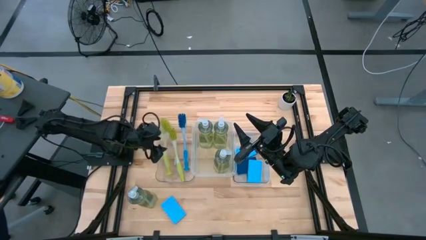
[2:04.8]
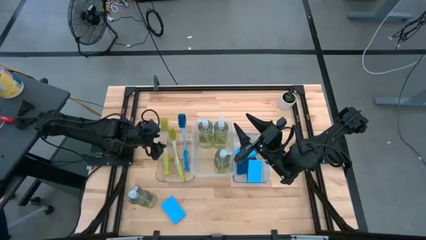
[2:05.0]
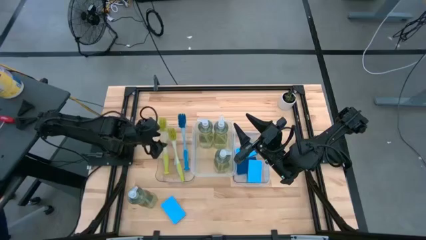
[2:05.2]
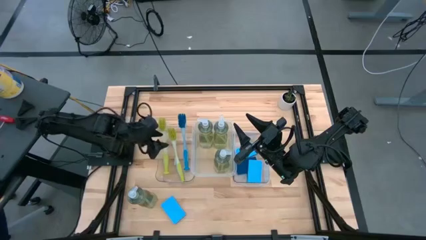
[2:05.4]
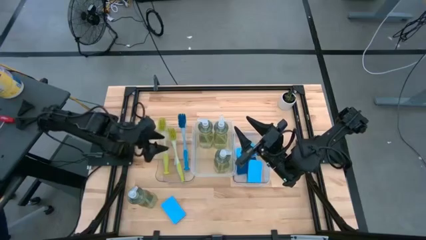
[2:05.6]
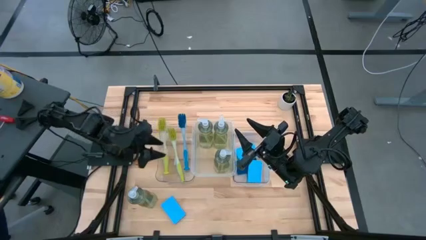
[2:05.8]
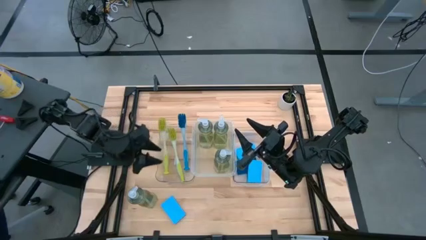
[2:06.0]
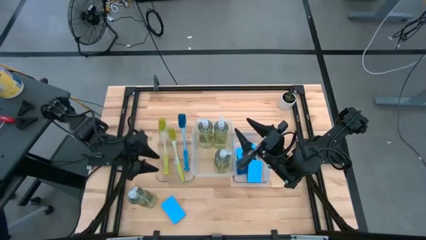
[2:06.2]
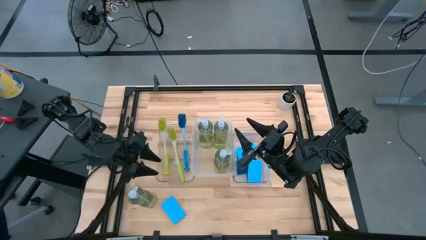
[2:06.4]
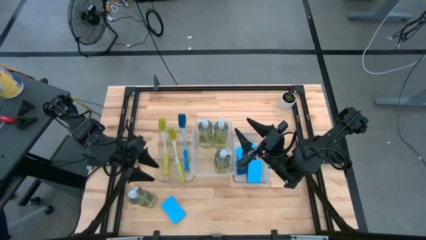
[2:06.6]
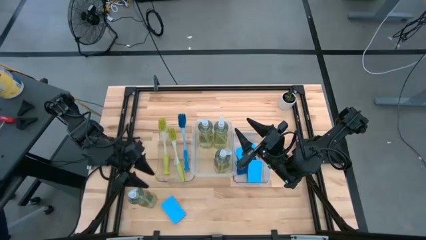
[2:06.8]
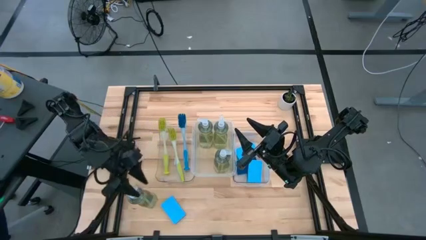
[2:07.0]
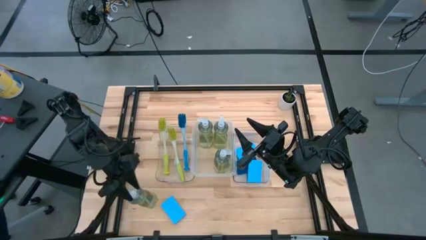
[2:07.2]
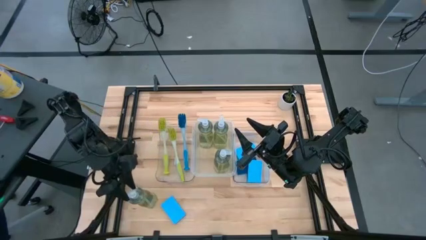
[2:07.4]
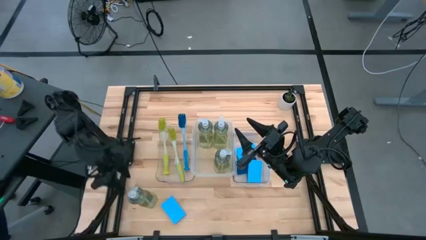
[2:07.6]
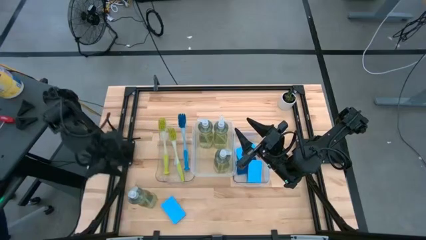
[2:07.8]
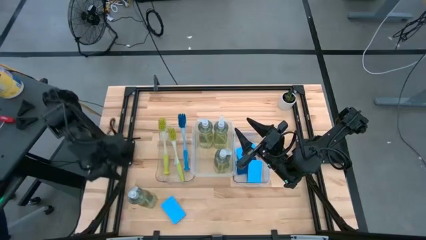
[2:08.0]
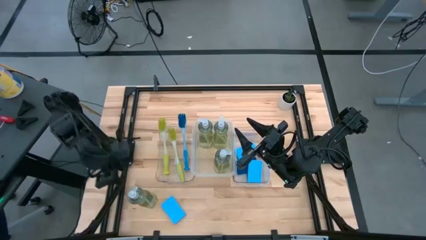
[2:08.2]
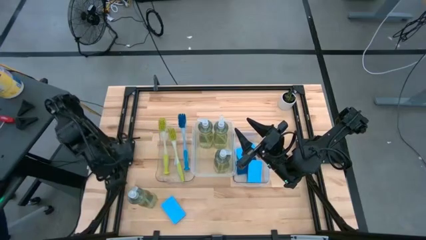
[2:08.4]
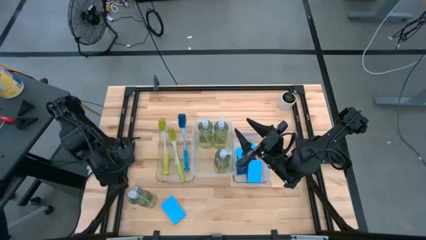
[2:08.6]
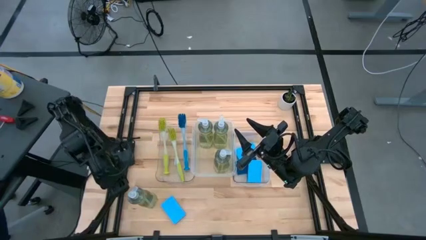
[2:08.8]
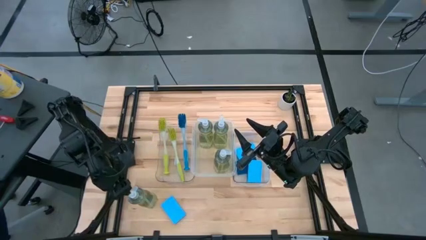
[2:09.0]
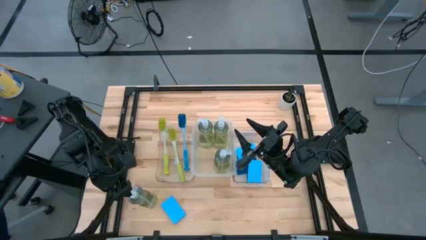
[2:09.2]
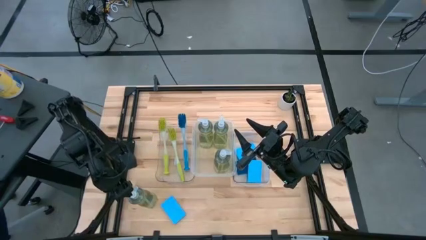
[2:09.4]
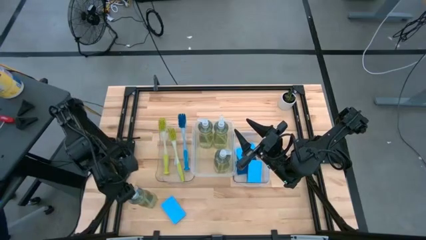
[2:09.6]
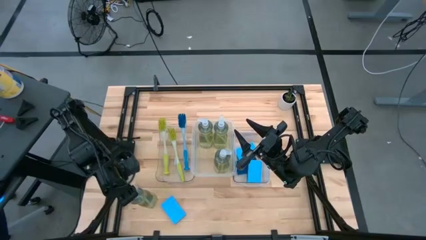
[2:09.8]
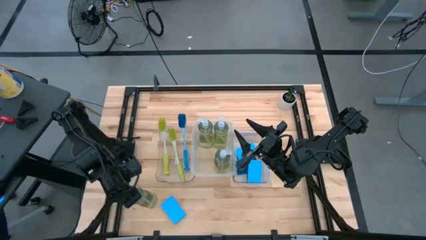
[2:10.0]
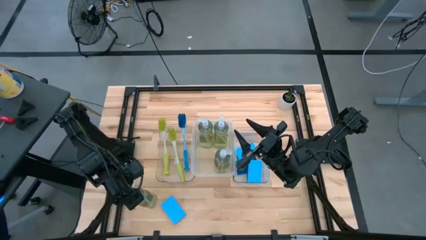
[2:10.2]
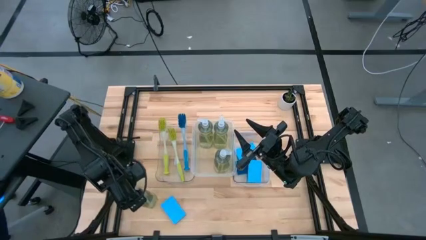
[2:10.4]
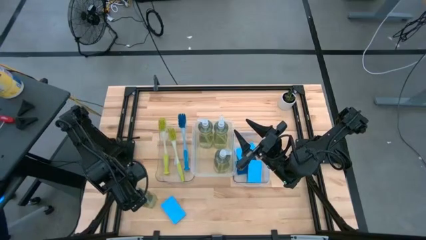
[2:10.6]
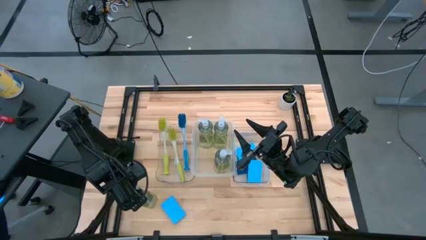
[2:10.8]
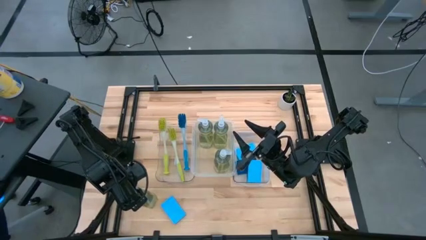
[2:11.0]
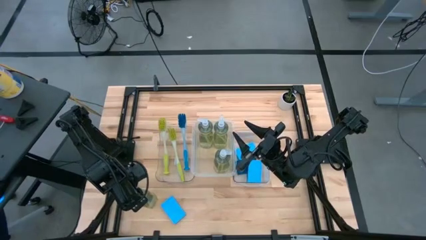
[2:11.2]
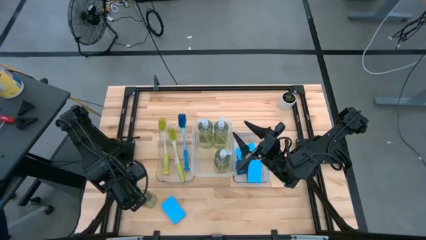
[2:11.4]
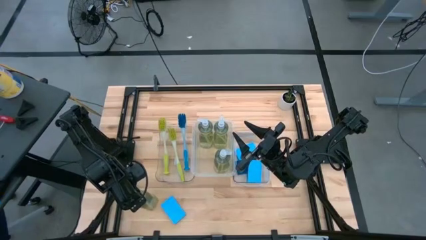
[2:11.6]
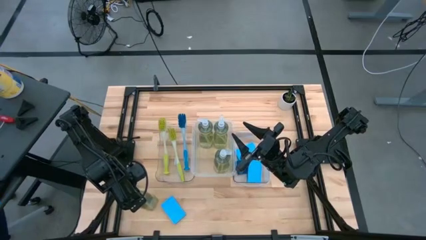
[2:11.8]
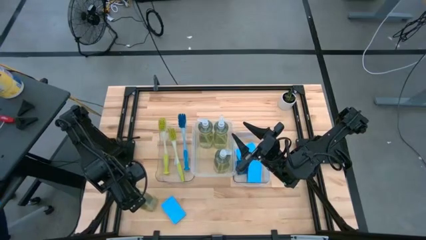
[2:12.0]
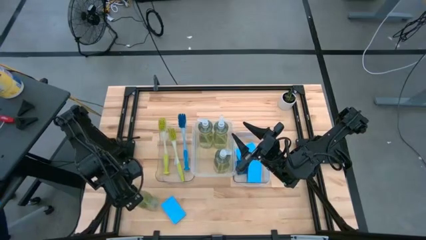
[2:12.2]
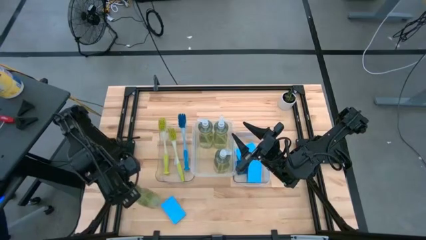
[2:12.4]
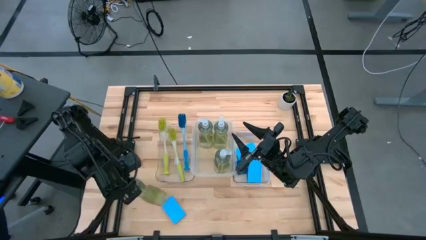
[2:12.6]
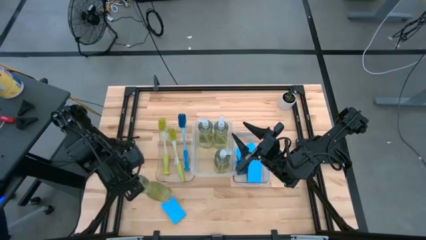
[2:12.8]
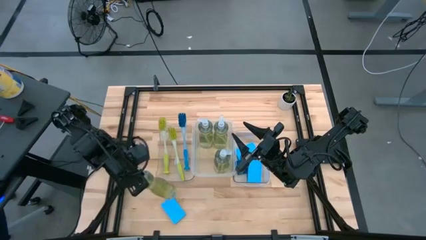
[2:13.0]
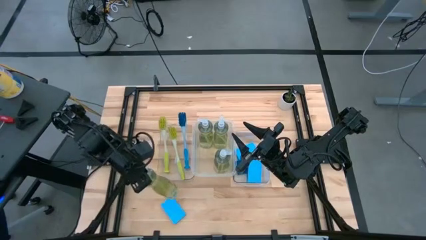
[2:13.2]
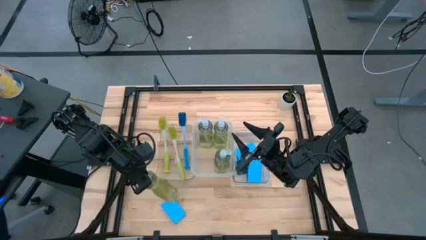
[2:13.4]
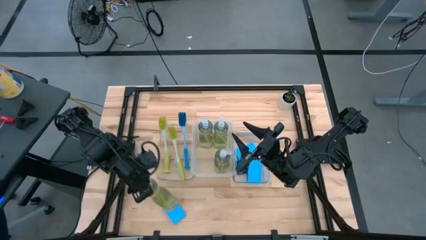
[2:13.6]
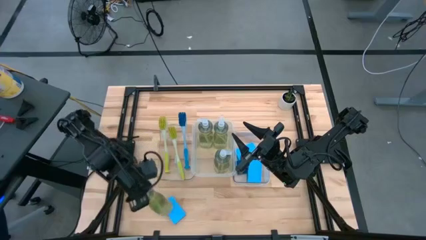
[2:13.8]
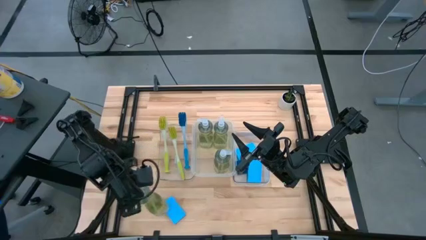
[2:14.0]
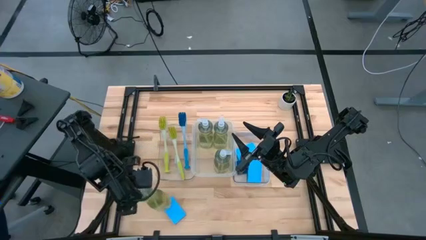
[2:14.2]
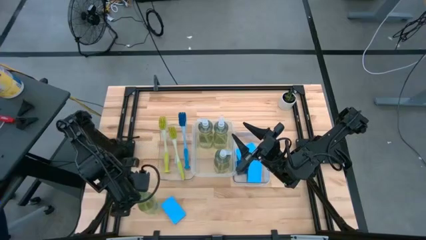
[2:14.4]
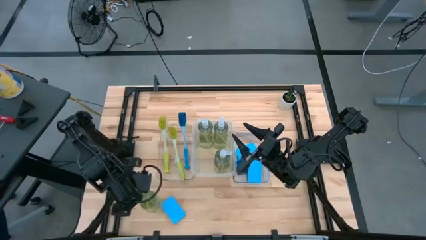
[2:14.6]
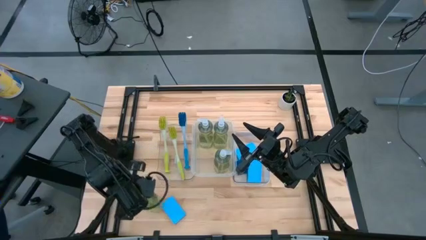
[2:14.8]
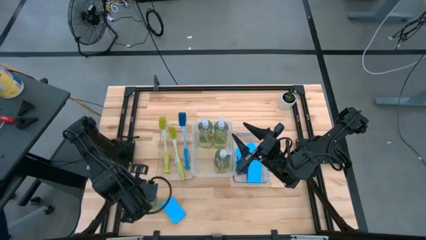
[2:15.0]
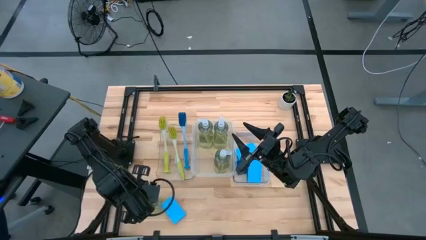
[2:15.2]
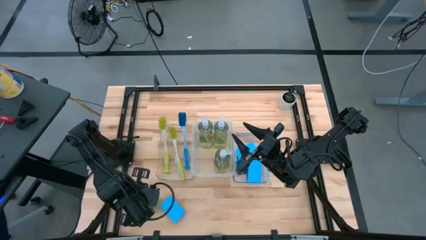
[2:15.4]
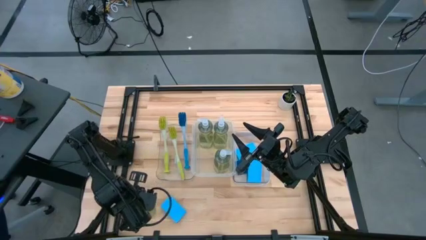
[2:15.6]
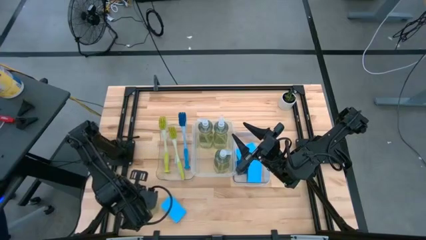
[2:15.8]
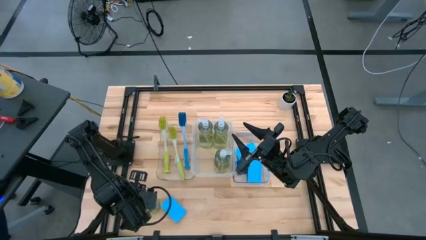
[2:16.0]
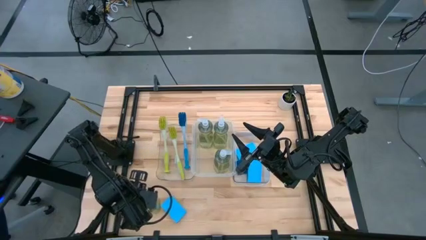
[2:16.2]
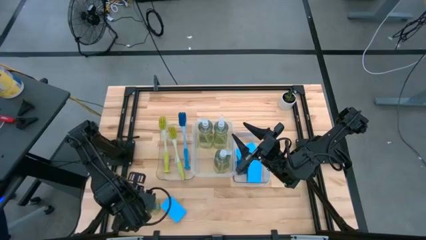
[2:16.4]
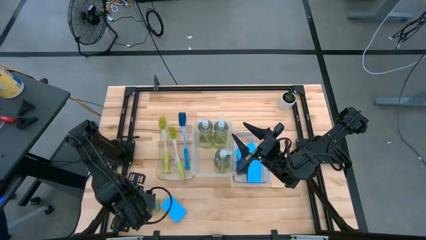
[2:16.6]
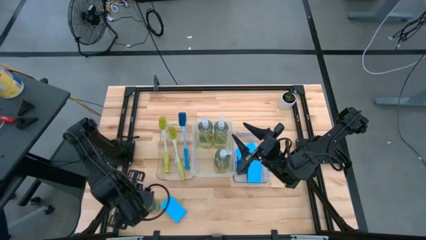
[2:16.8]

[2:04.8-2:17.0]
Task: Pick & Place Kitchen Sink Supplies
Put the transparent dishwashing liquid dispenser into the middle transparent bin

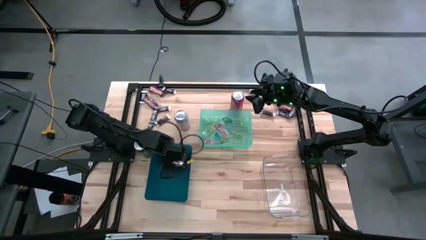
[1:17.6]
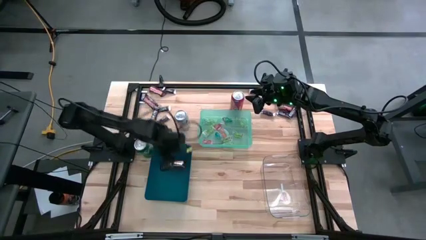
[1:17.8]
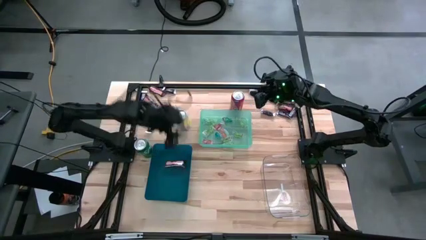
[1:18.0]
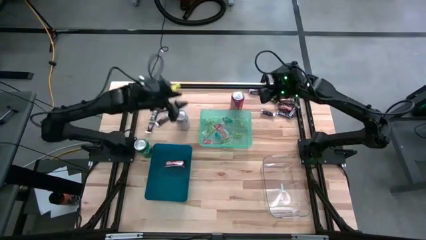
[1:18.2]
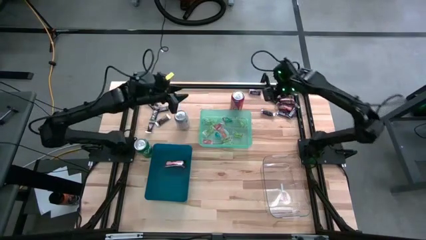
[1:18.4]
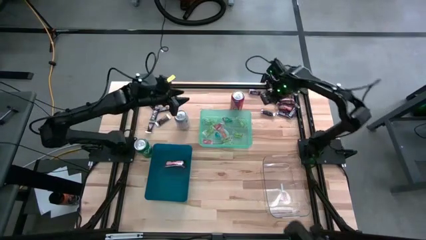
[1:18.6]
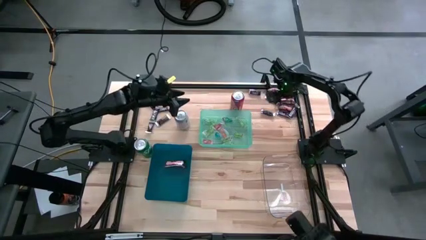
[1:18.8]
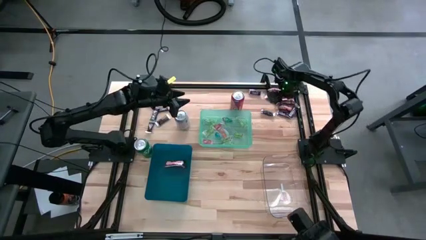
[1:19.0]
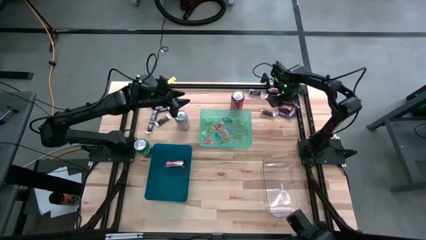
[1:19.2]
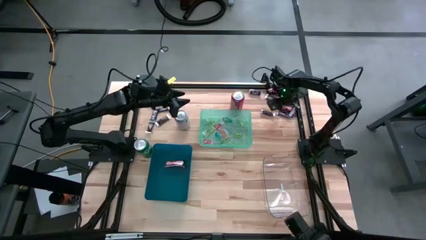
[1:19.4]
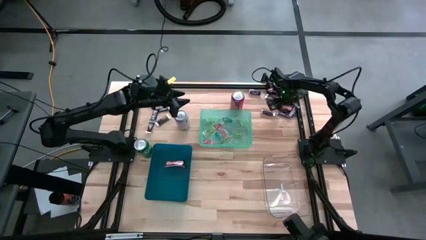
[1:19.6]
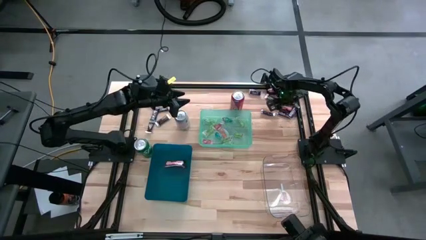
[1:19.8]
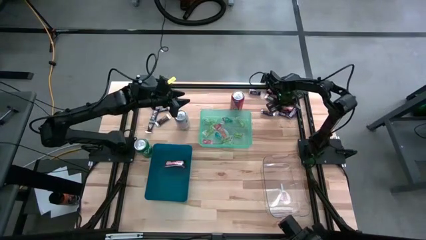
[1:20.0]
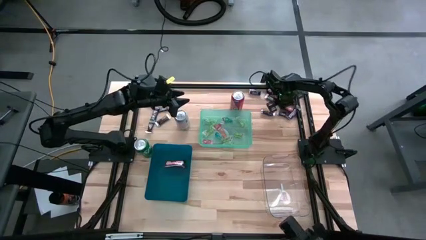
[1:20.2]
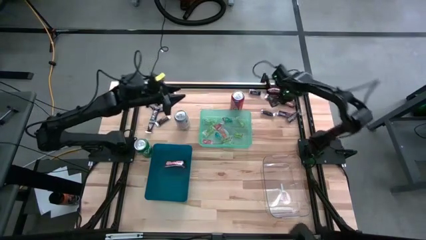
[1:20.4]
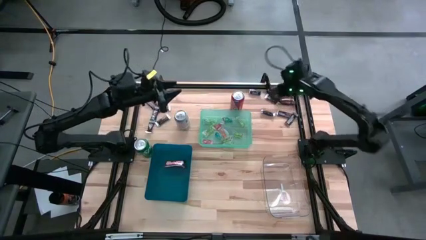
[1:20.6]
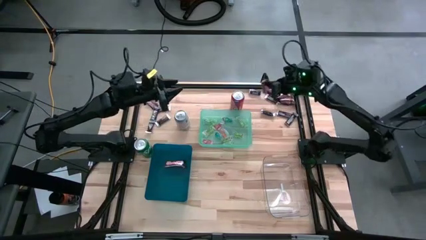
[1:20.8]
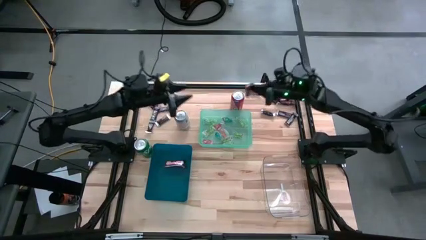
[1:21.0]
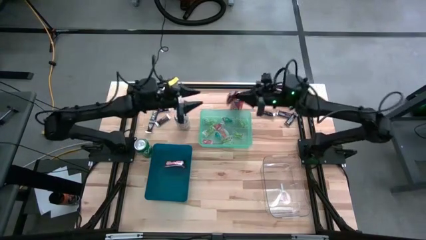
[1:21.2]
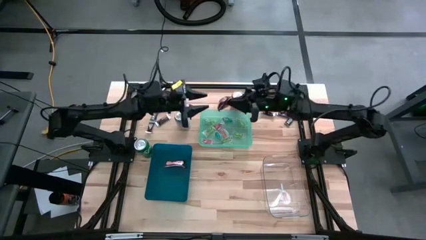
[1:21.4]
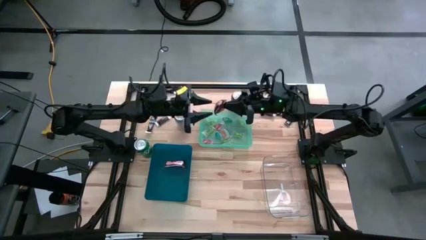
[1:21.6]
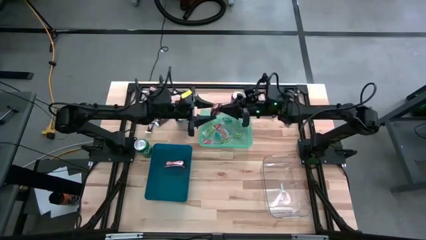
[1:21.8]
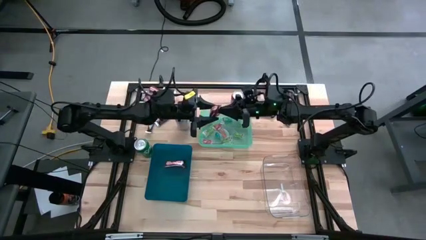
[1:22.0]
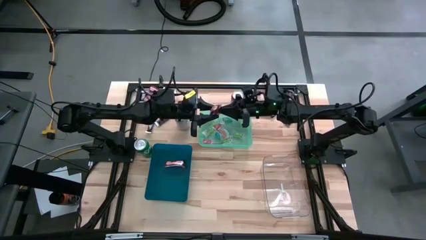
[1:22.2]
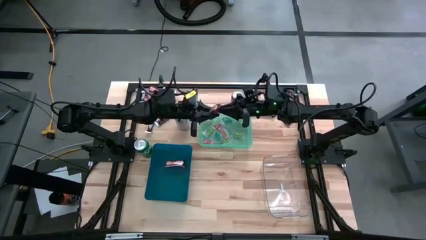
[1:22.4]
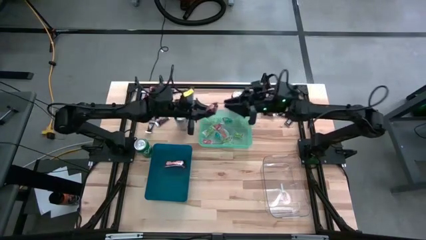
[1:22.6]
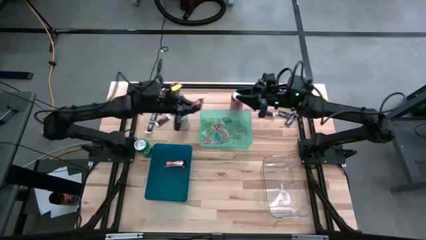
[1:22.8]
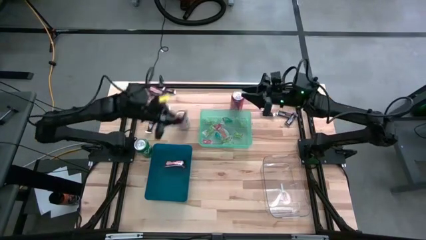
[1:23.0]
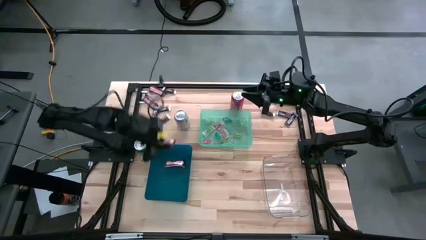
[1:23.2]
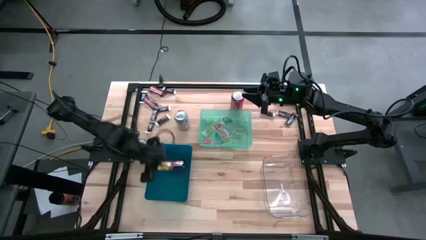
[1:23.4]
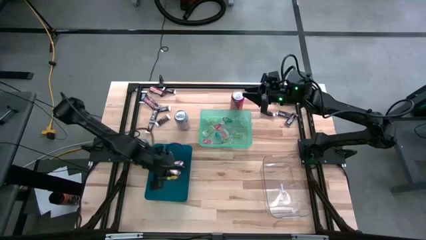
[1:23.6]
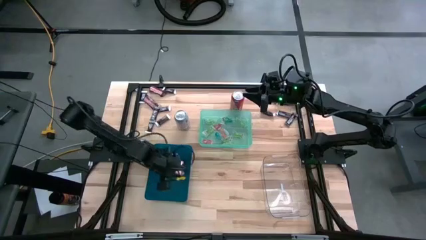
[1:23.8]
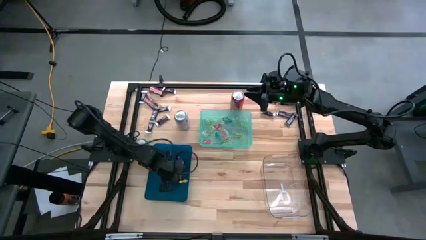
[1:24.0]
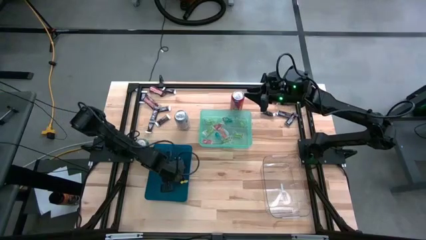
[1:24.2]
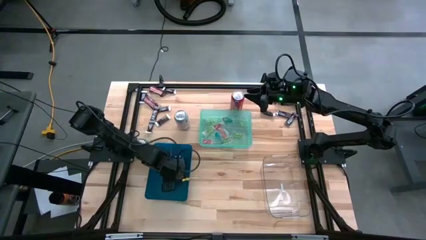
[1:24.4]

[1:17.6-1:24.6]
Task: Organize candy in baskets
Put the brown red chocolate into the blue bin
